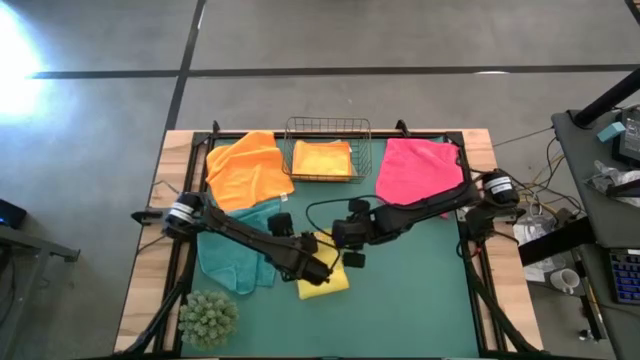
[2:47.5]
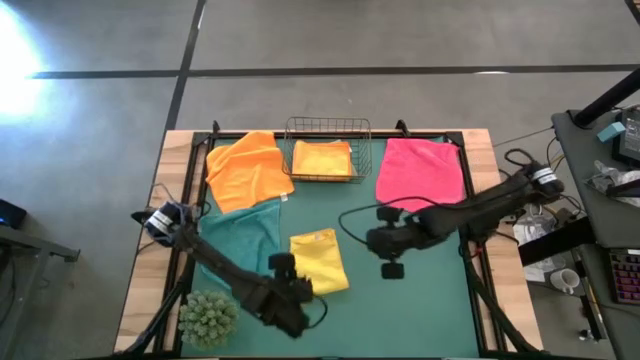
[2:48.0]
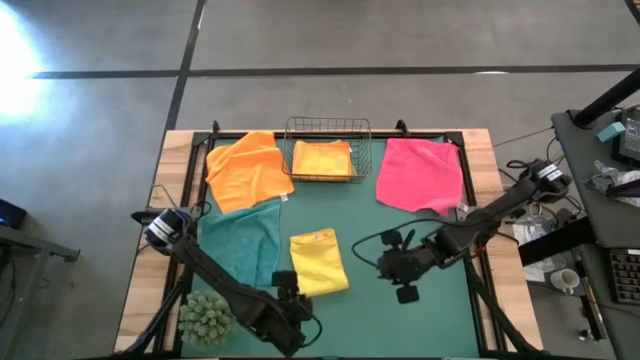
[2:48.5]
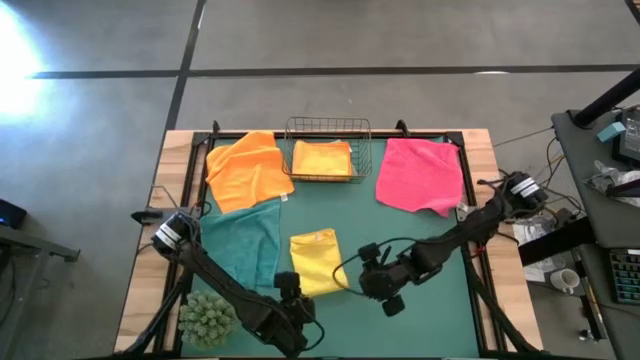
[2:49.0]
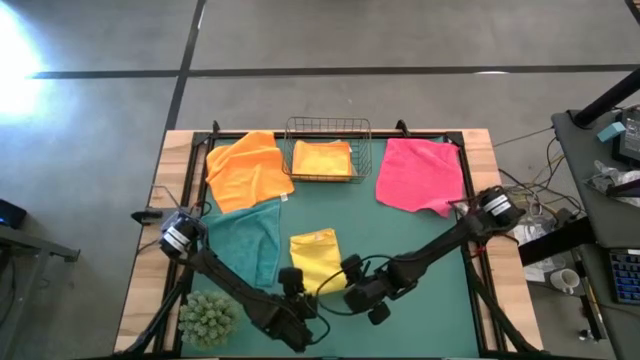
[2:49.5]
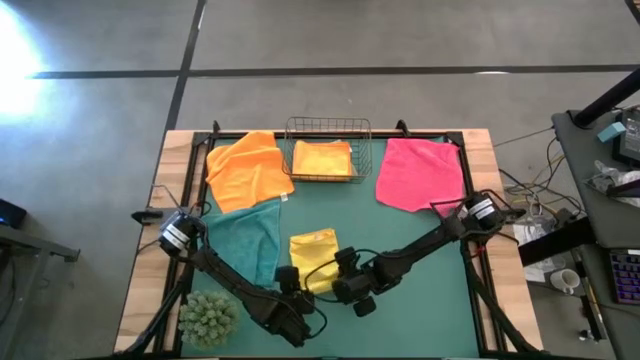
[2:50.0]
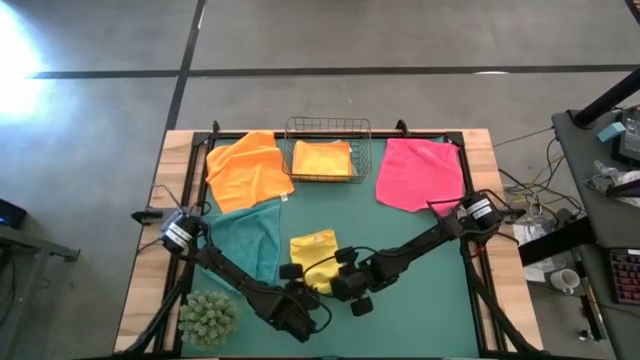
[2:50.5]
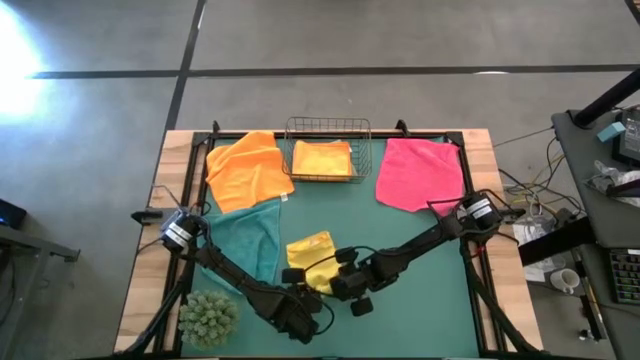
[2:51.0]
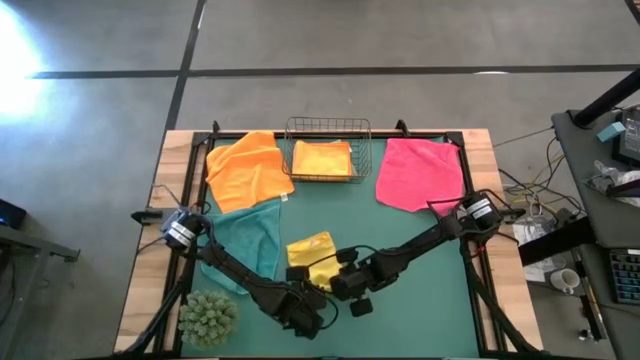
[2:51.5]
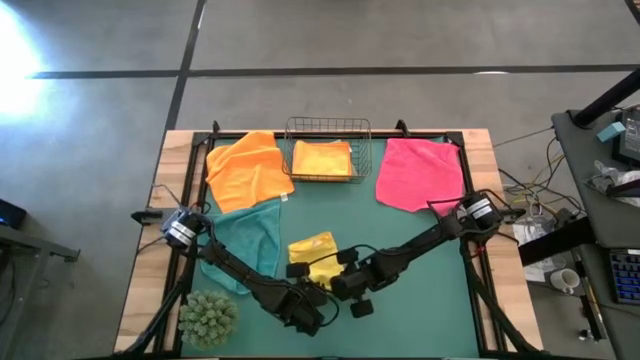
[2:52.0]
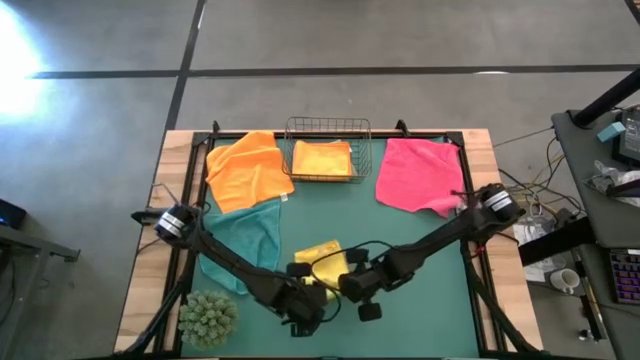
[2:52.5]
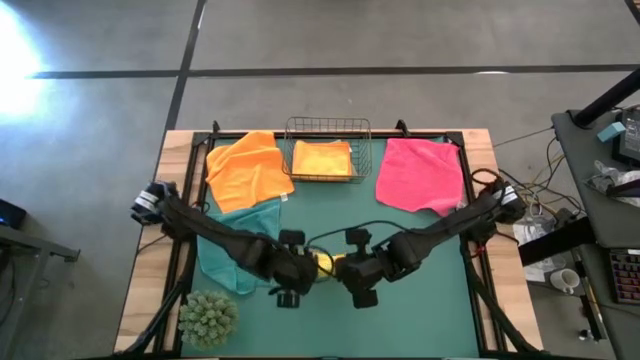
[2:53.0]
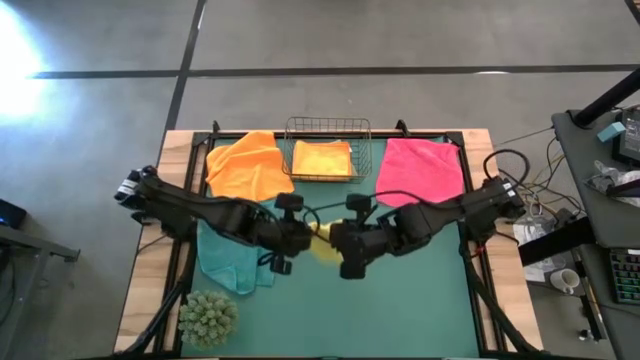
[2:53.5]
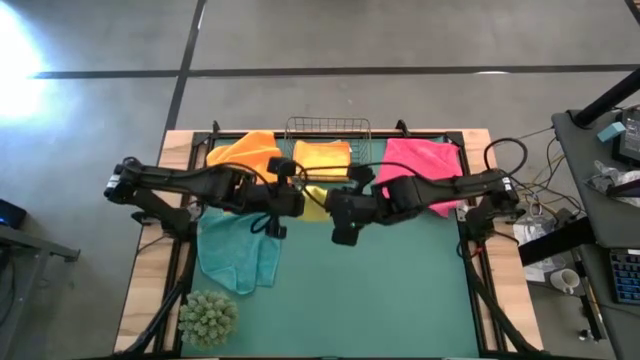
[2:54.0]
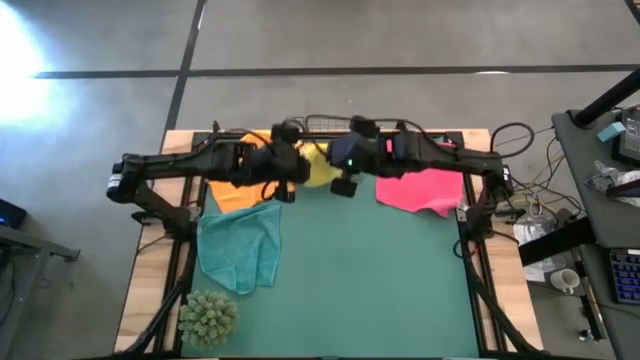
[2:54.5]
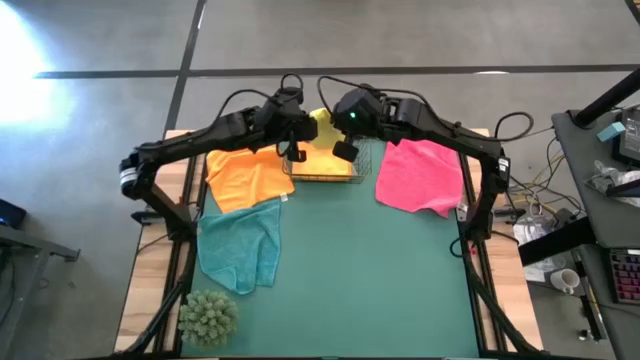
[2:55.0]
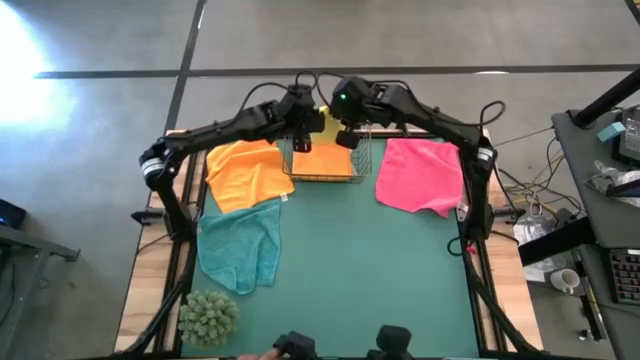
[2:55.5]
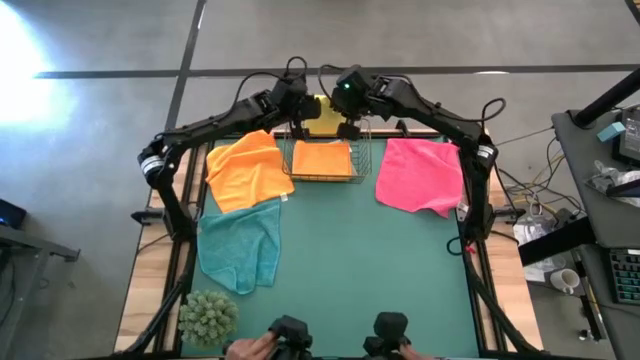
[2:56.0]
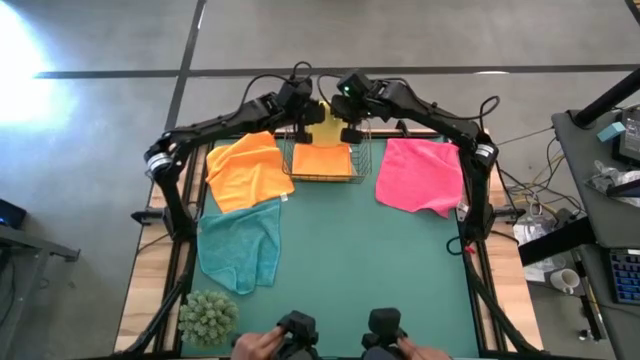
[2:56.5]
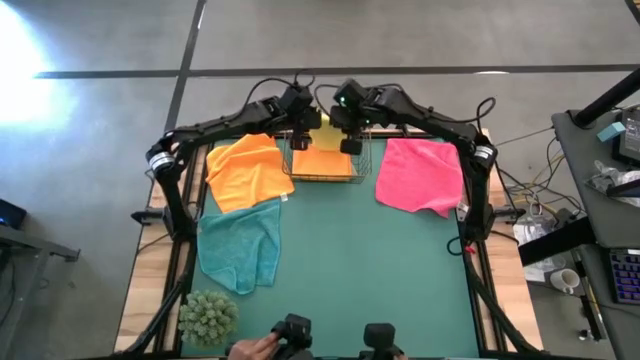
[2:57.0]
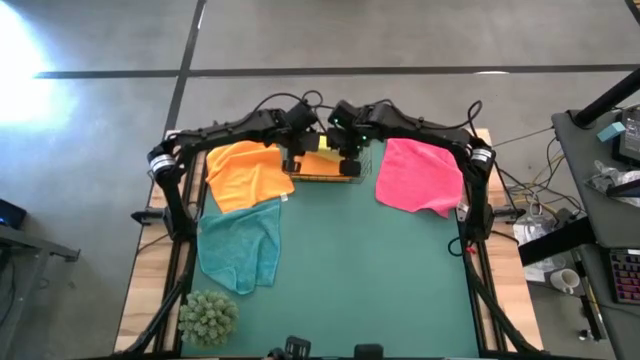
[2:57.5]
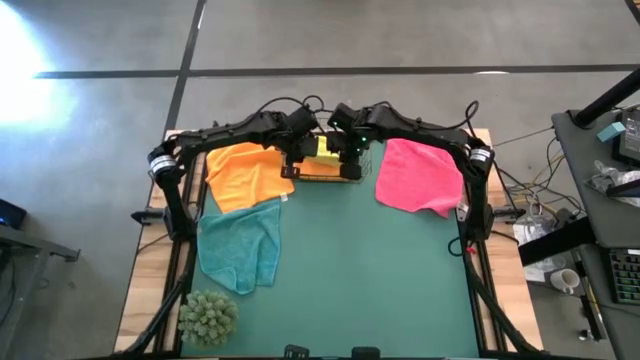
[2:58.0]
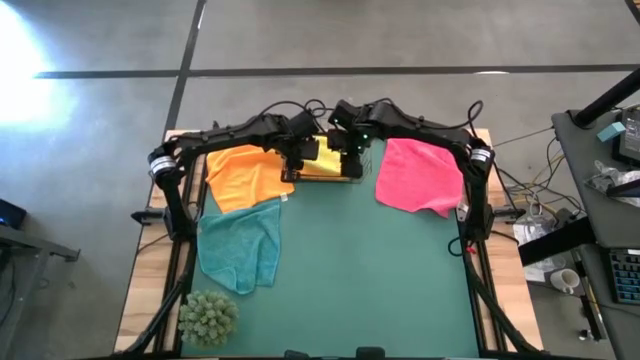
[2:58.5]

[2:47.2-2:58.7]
Task: Fold microfiber towels
Put the yellow microfiber cloth into the wire basket

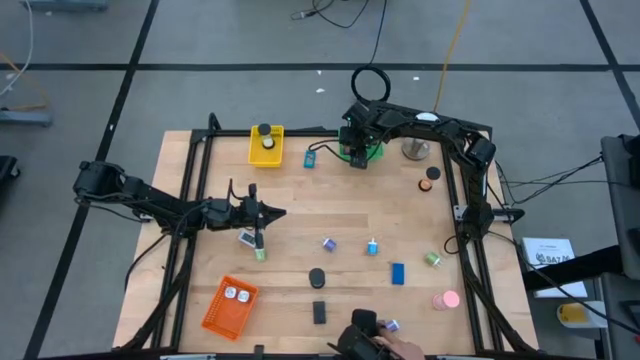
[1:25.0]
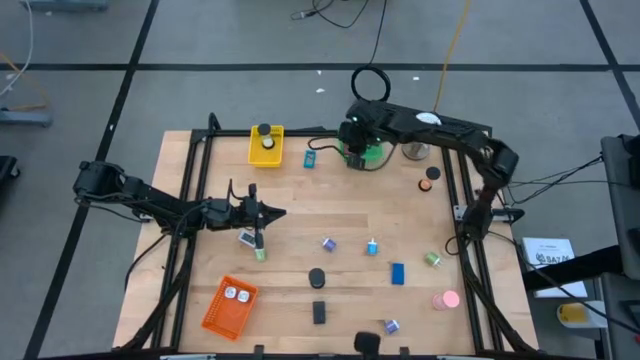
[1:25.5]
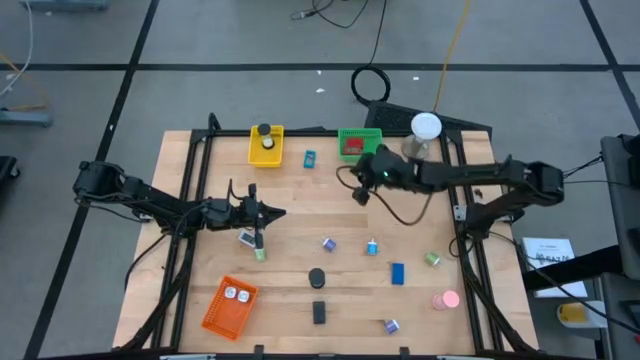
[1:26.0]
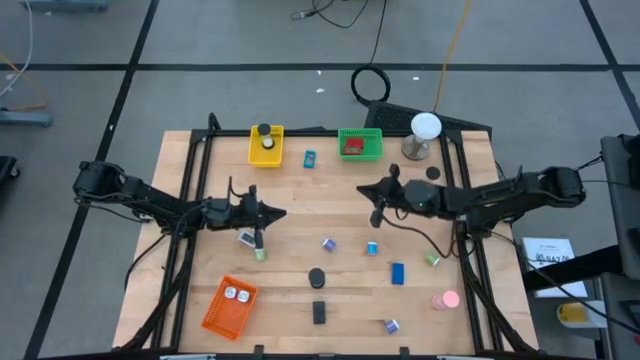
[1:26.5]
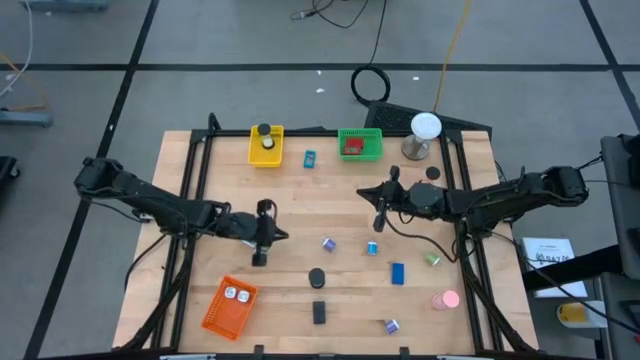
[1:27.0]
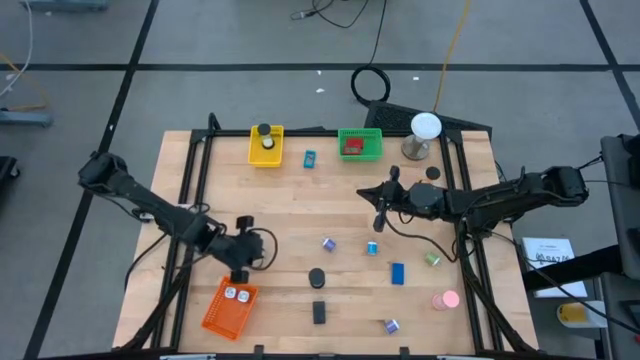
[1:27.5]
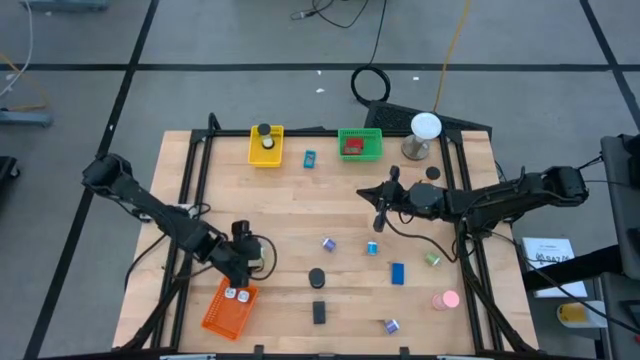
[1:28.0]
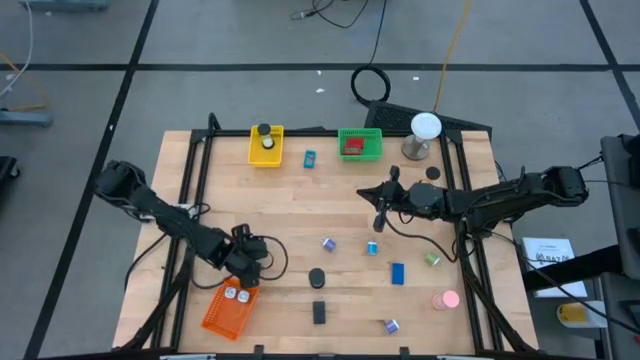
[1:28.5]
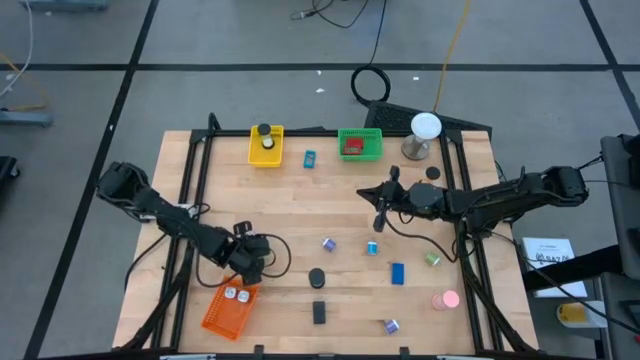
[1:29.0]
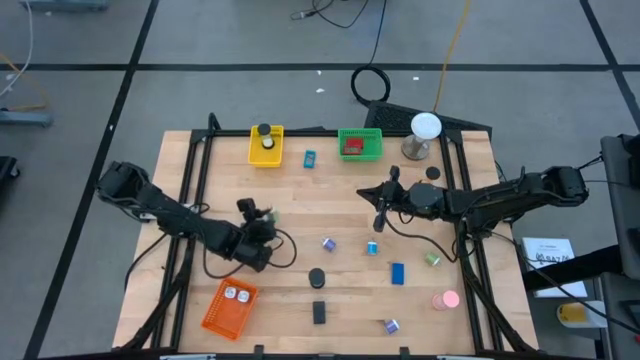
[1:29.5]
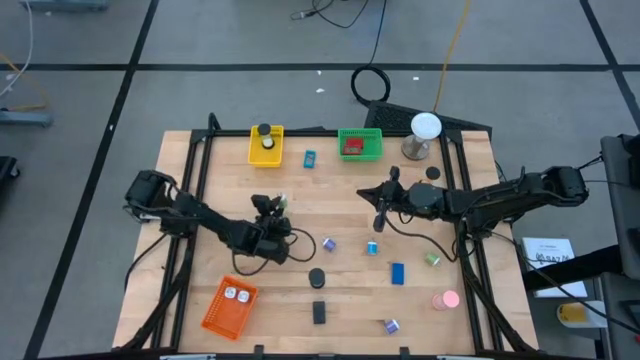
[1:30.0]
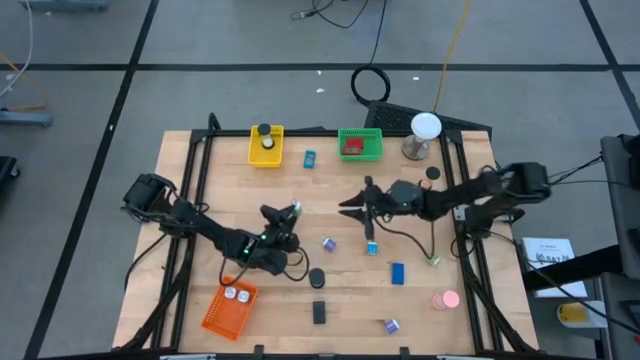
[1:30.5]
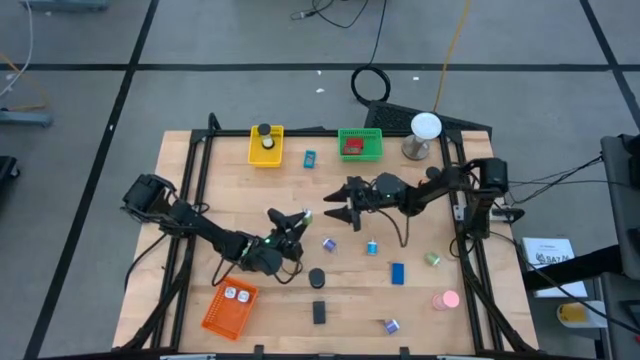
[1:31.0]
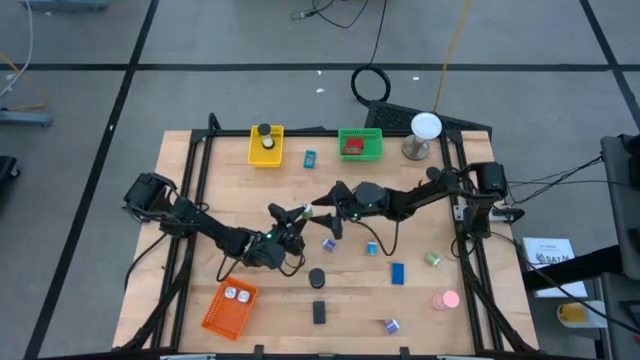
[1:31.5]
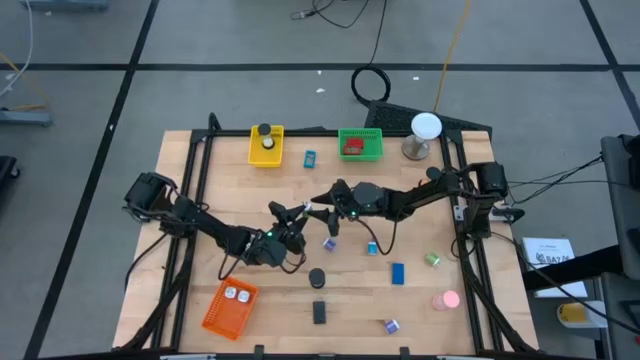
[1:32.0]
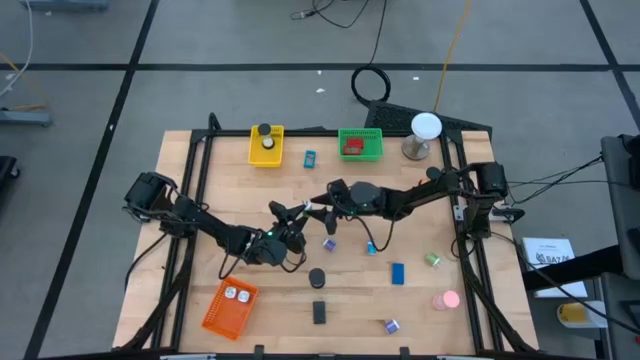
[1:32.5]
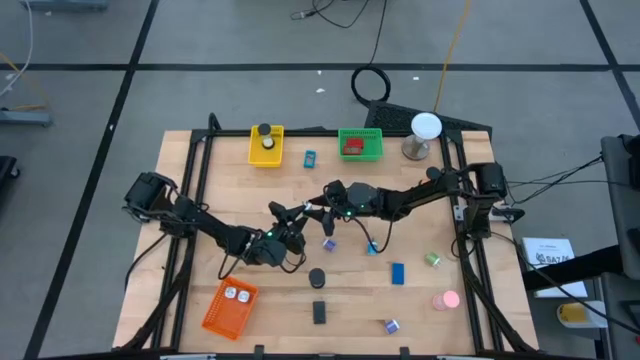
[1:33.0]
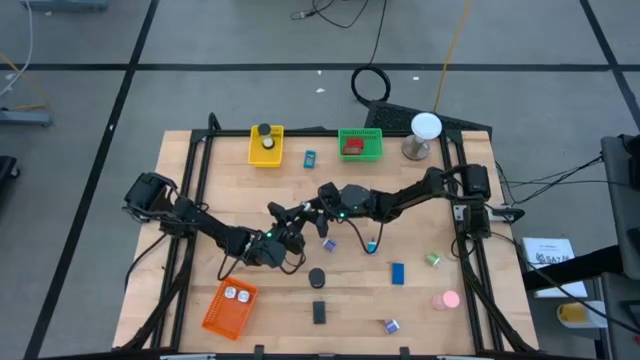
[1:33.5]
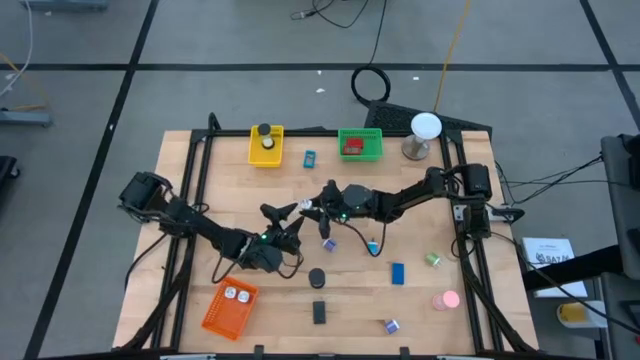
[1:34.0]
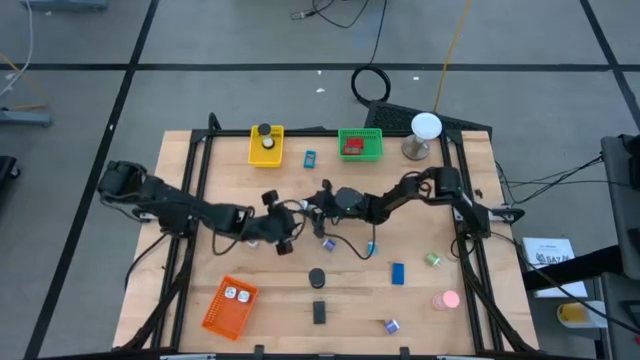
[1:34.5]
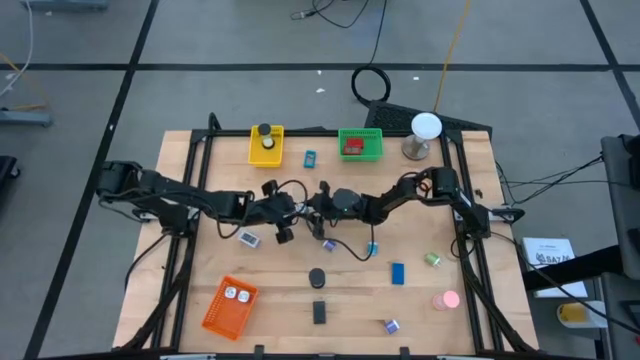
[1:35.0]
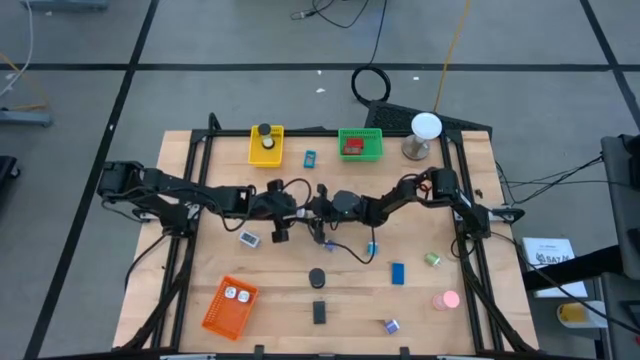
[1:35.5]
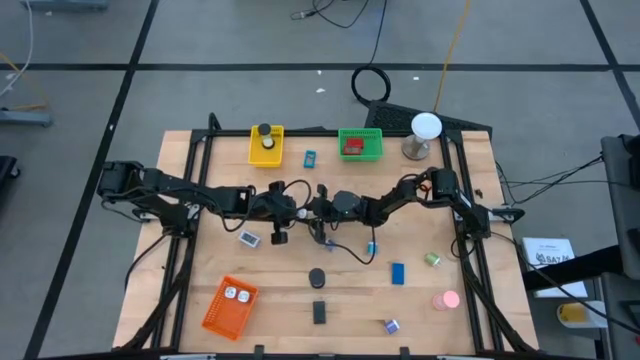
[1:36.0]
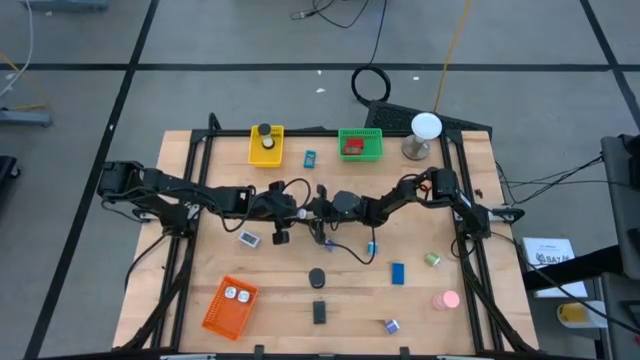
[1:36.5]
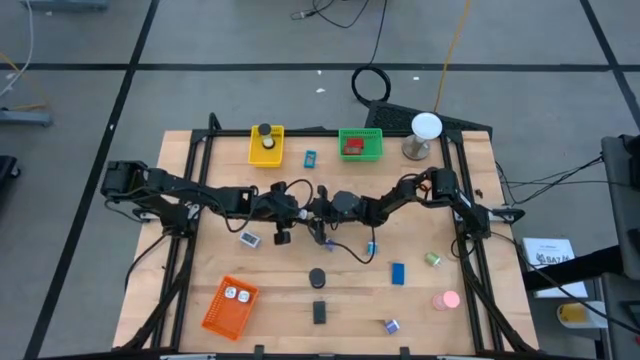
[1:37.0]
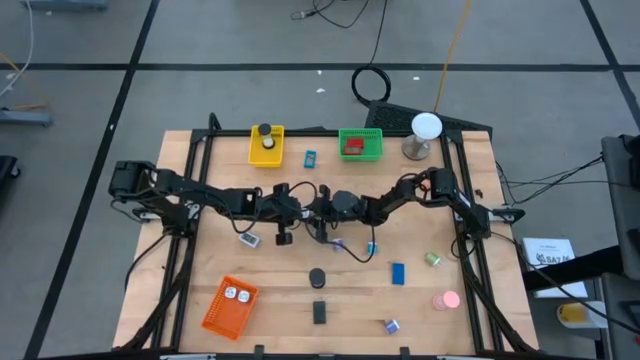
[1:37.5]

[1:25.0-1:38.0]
Task: Pick & Place Office items
Put the left green charger adapter into the orange bin
